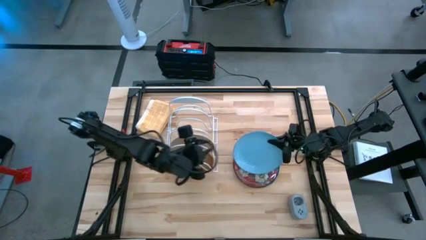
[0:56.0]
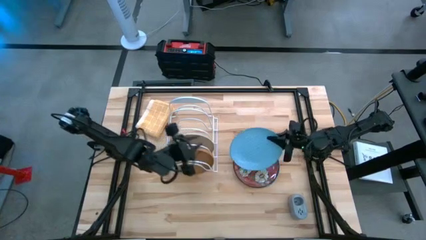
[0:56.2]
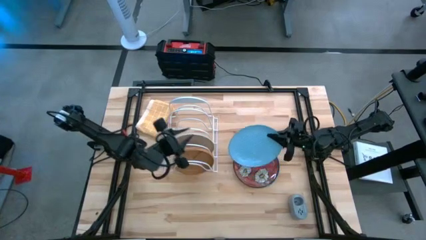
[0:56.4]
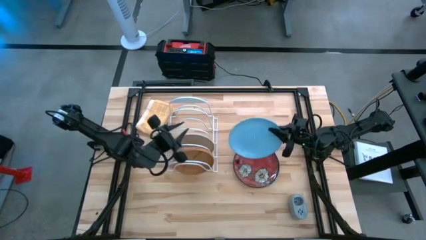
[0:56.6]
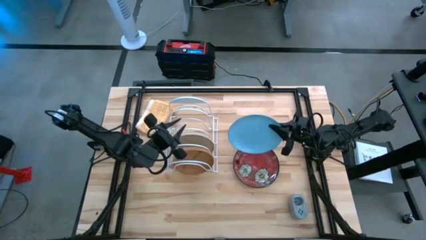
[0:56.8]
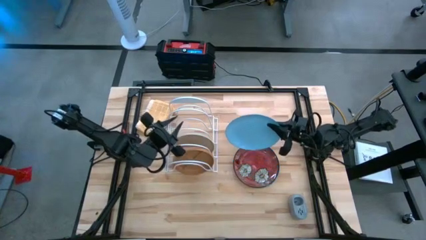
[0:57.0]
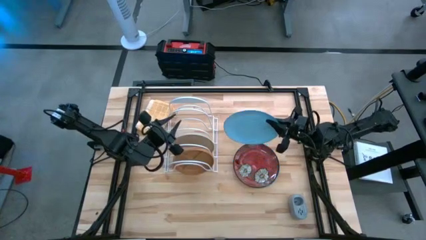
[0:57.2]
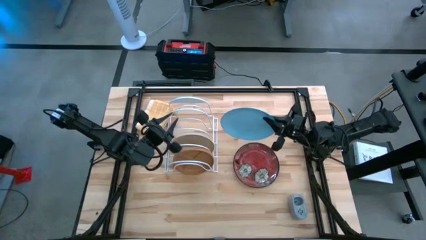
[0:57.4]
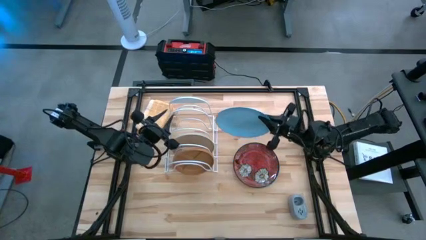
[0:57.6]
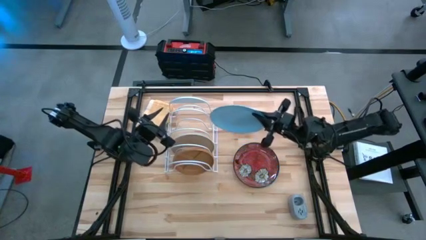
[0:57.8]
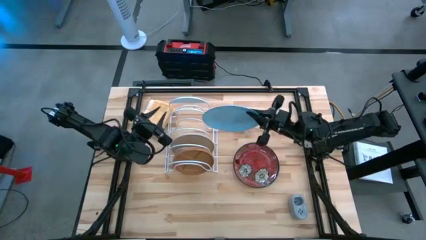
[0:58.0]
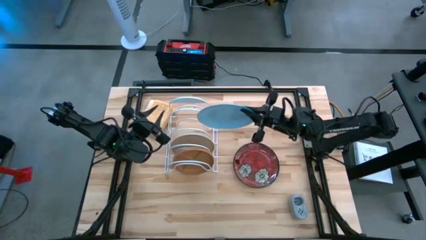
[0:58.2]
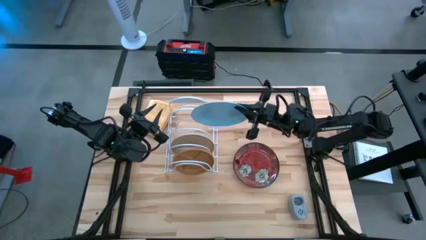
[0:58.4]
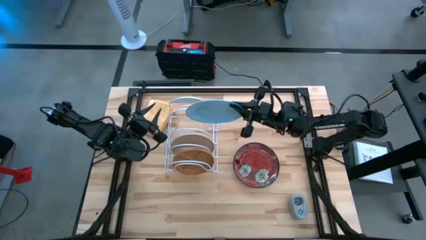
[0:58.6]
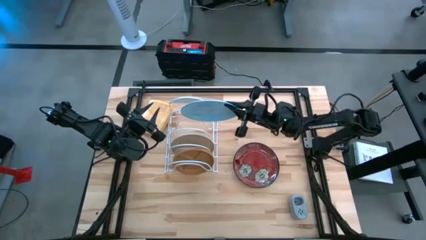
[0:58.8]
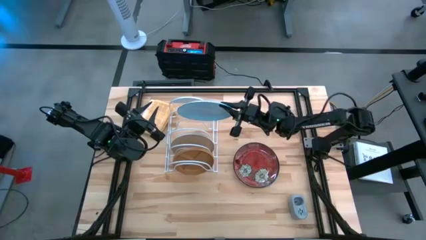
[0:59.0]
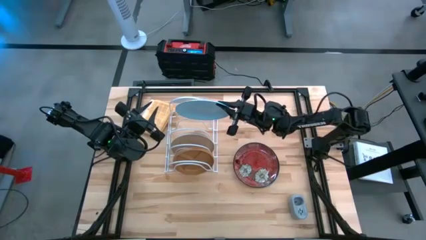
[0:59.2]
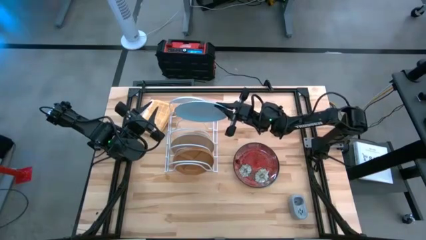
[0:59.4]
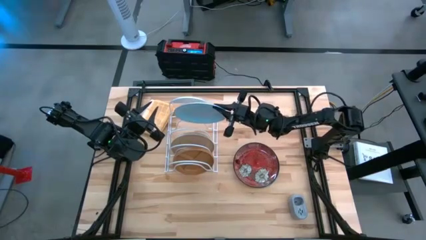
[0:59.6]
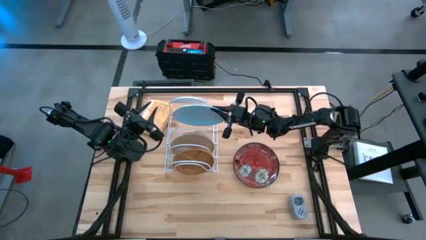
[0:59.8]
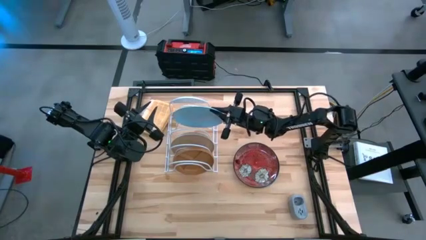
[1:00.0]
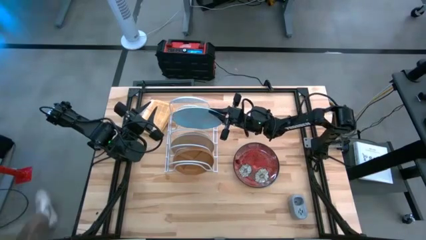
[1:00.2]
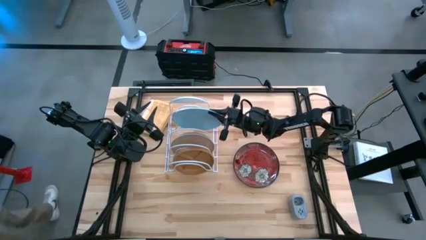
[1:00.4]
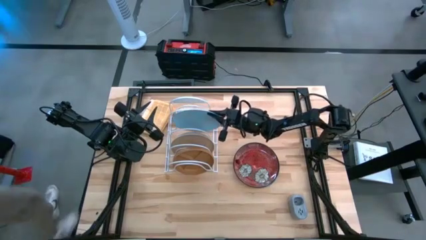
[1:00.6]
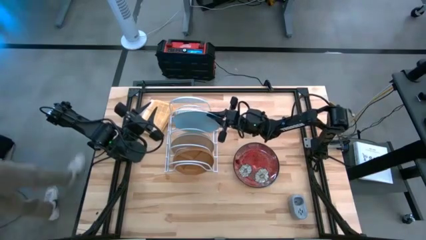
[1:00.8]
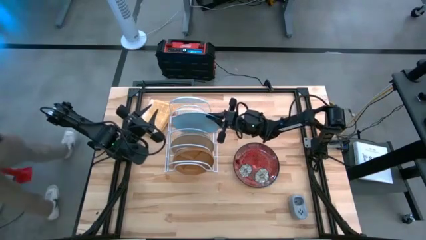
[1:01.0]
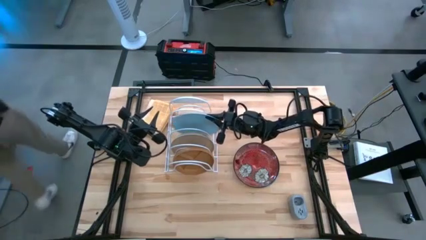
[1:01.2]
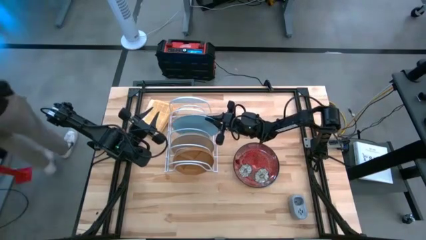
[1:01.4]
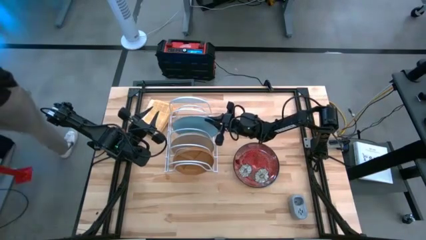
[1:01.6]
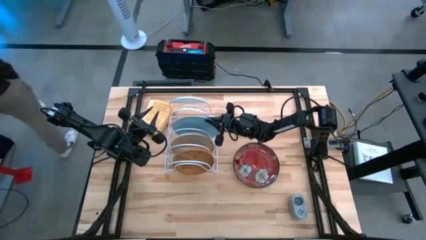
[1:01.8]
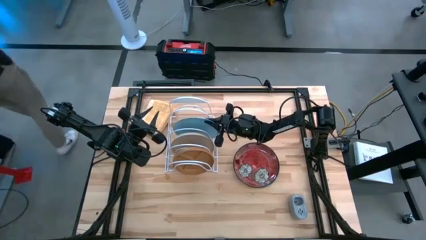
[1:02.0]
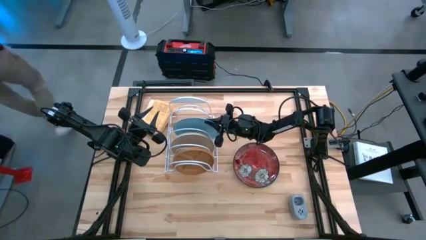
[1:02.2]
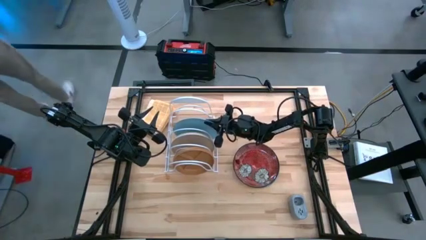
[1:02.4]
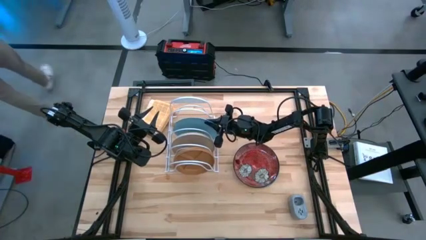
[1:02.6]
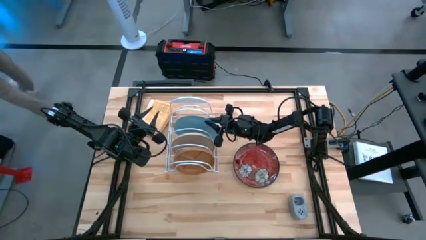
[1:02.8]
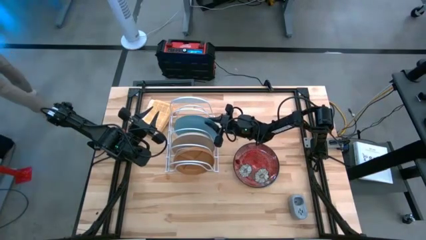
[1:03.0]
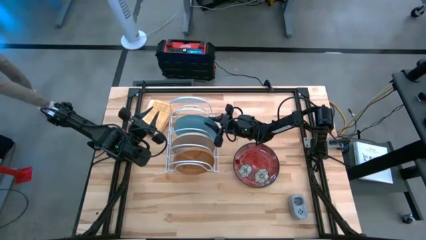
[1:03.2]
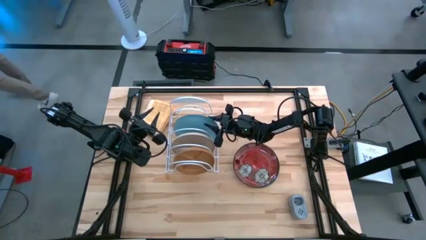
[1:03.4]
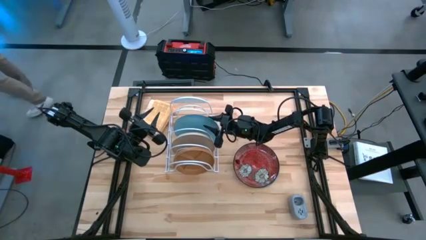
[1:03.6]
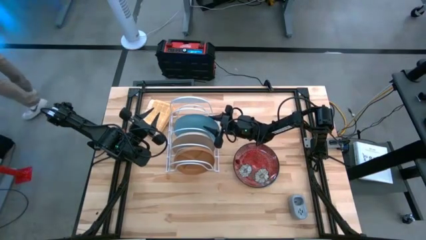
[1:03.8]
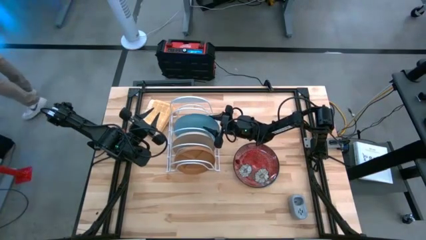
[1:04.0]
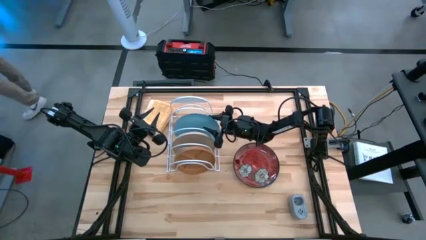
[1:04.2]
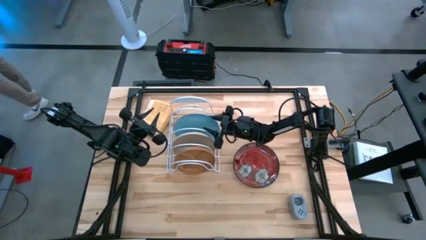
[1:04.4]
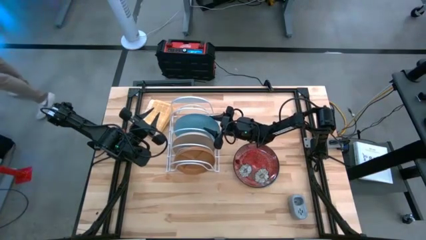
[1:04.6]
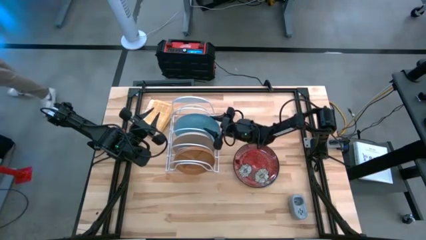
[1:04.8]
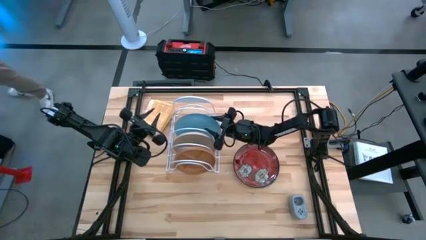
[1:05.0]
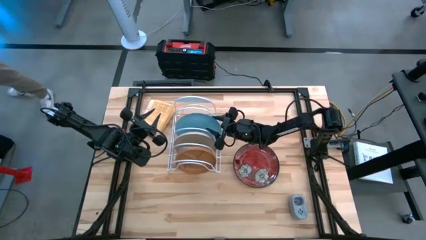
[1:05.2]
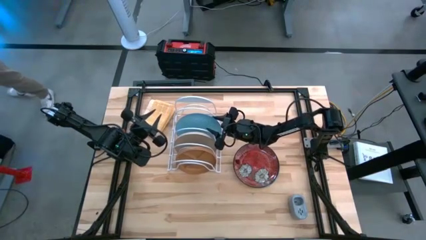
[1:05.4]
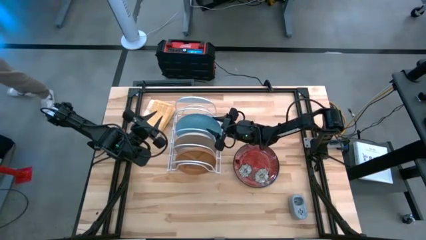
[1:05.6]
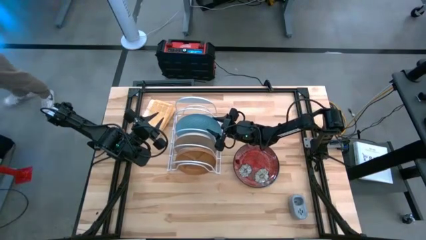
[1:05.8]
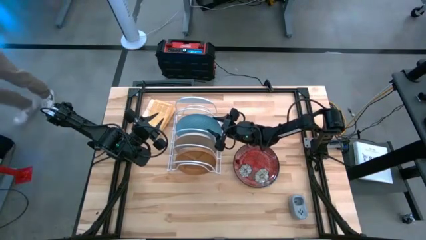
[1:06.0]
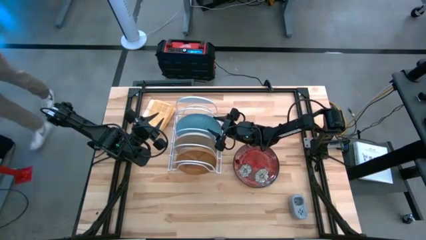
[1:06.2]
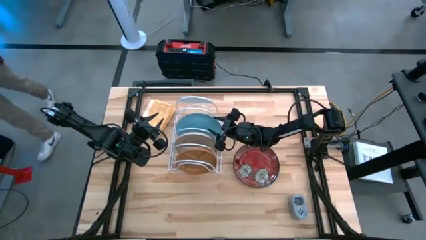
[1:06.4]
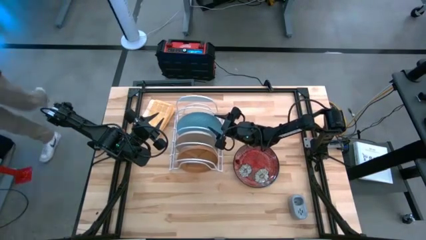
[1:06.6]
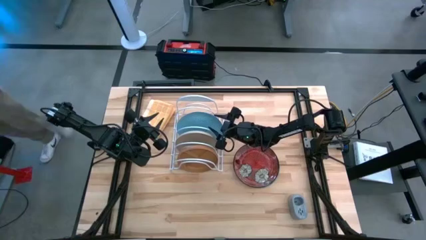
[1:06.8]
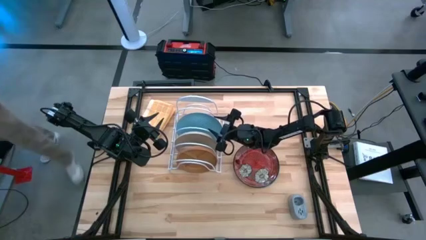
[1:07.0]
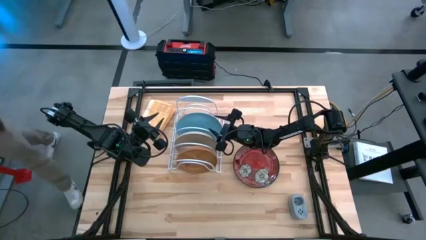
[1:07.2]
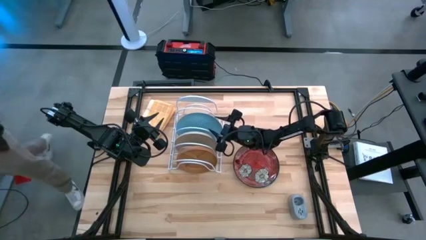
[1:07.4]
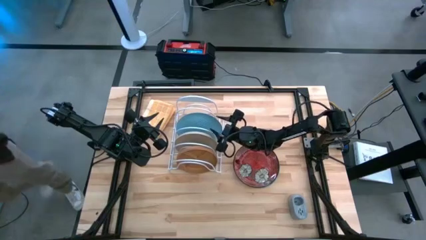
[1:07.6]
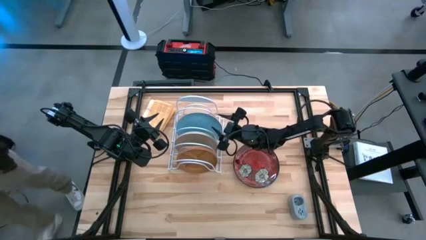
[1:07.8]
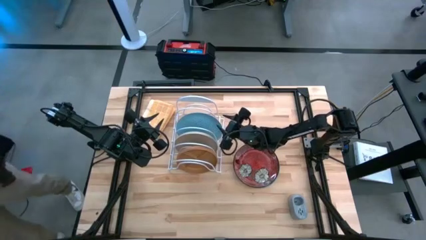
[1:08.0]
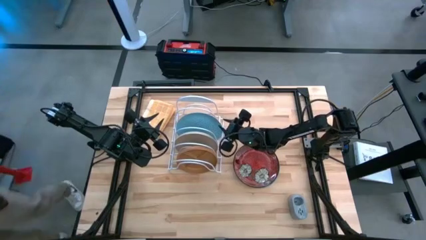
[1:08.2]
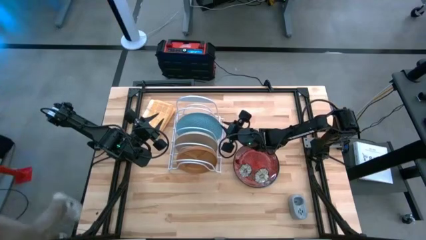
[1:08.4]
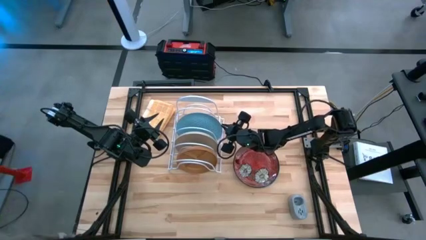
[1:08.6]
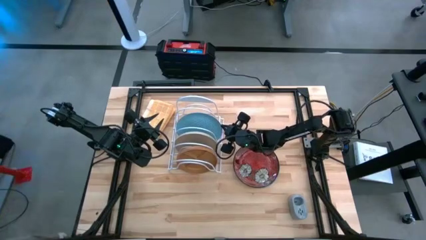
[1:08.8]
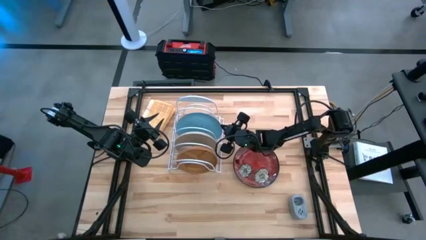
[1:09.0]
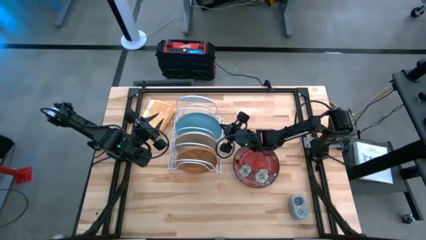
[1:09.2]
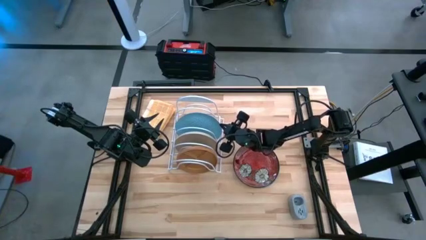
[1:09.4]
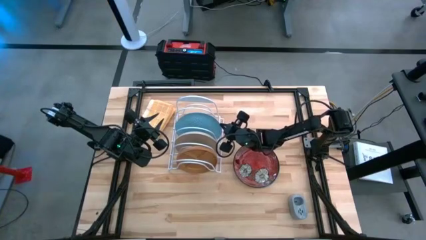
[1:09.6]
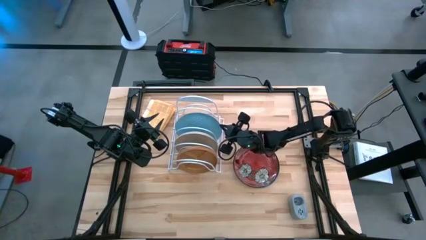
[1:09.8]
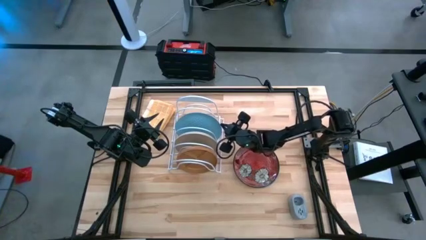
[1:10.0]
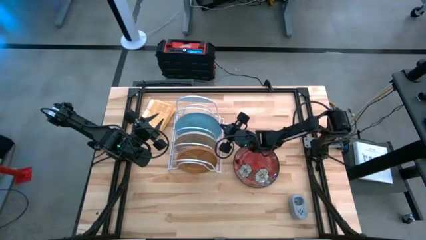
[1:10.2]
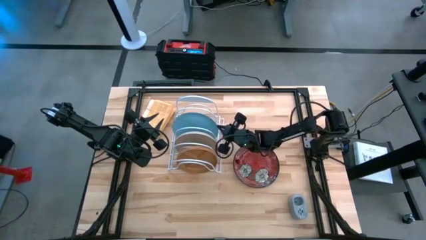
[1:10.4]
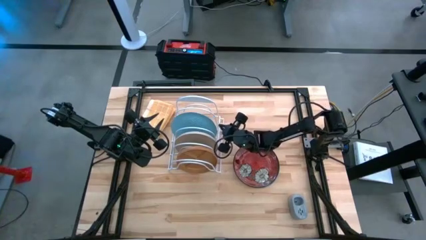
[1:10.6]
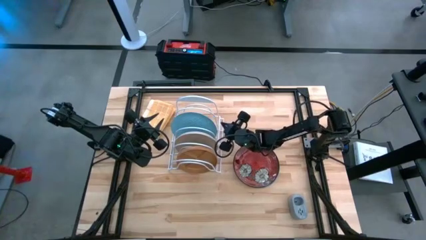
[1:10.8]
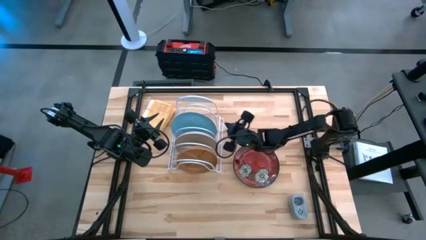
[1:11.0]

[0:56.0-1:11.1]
Task: Sort dishes
Put the blue plate into the dishwasher rack
